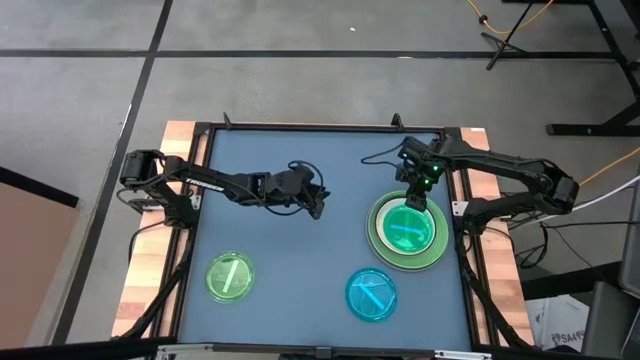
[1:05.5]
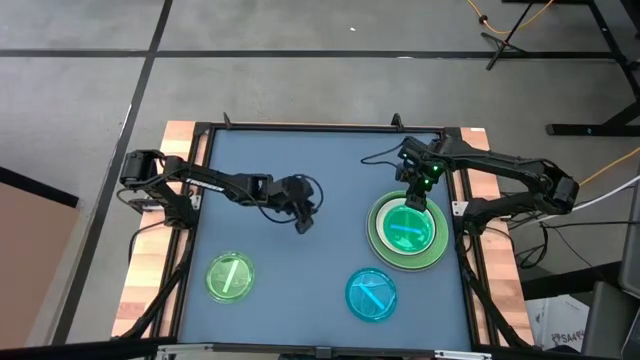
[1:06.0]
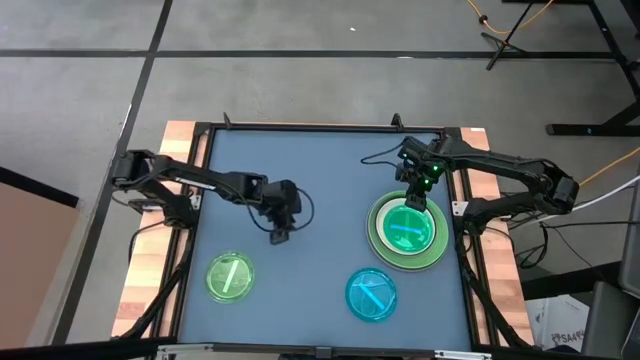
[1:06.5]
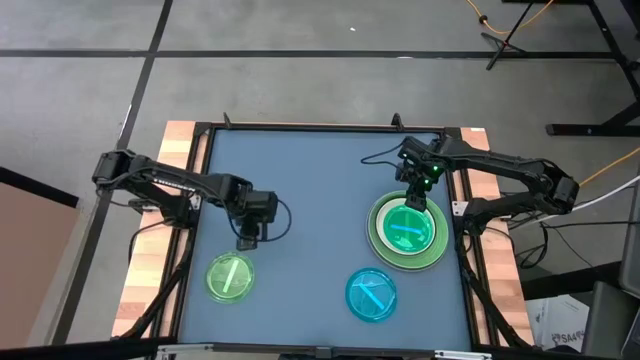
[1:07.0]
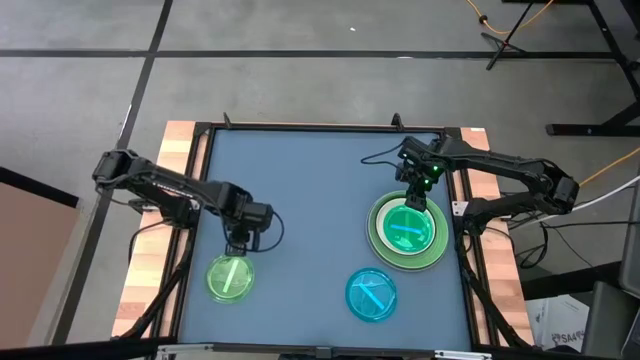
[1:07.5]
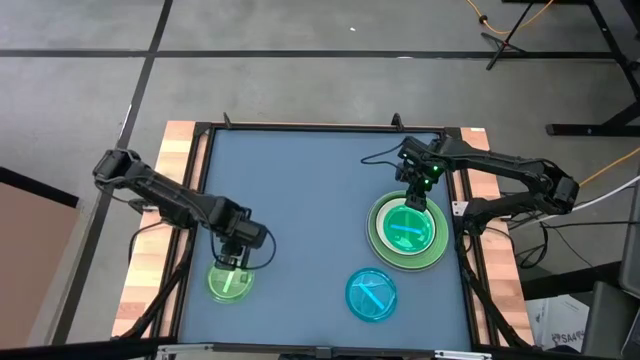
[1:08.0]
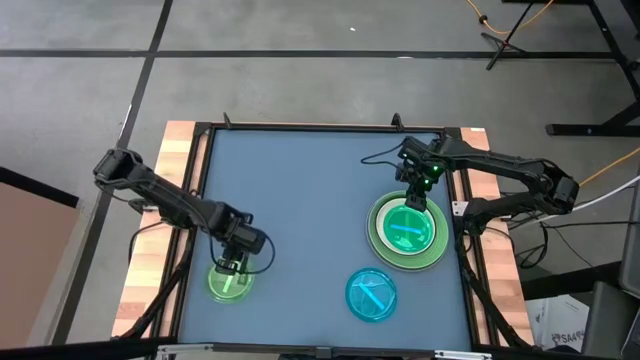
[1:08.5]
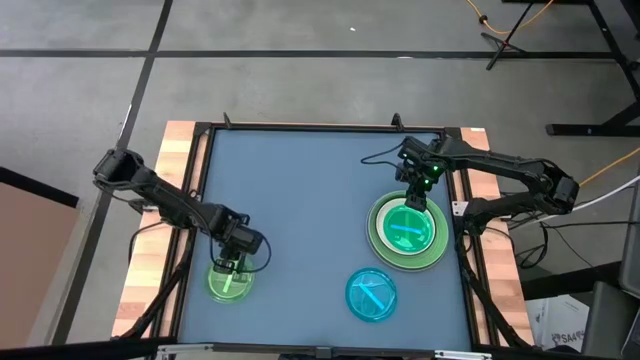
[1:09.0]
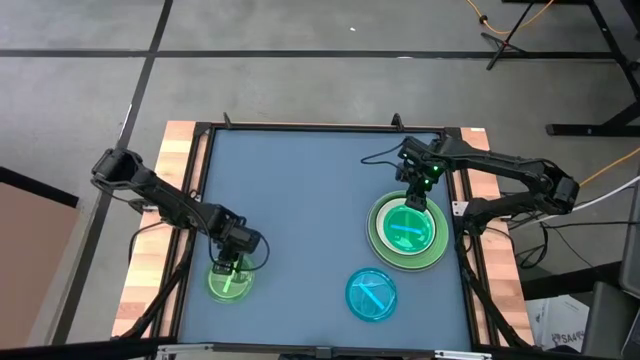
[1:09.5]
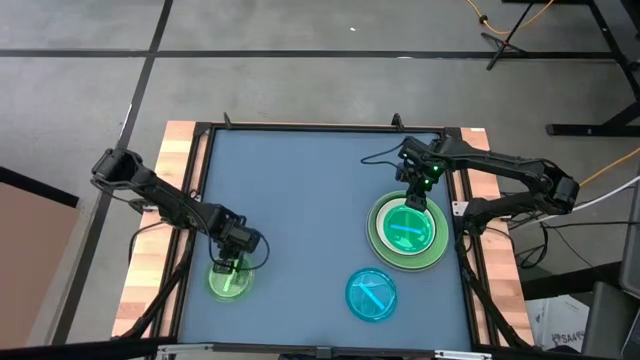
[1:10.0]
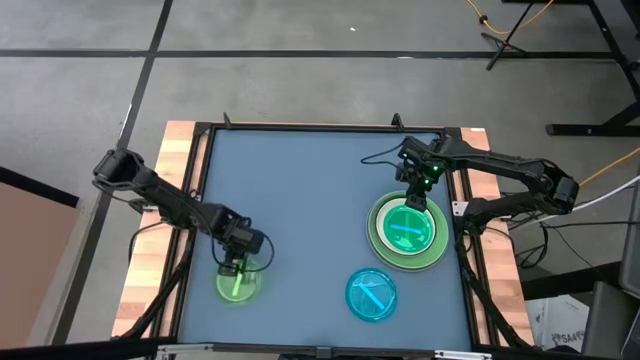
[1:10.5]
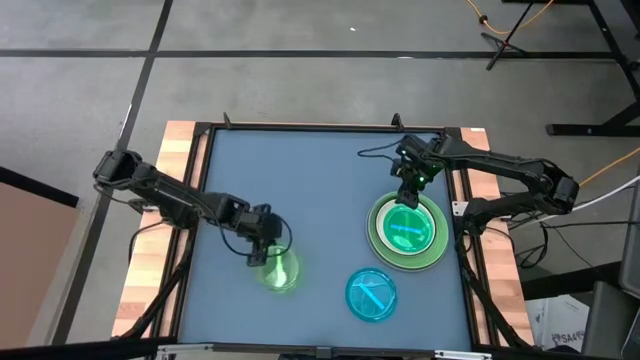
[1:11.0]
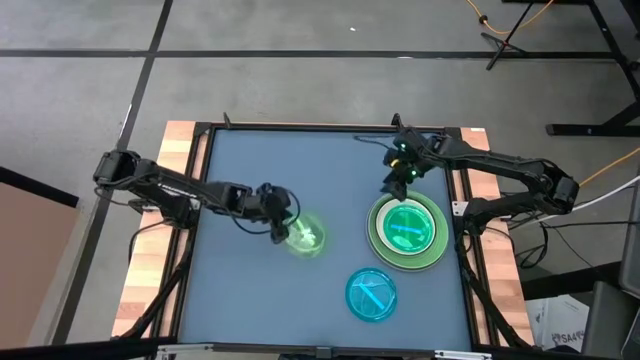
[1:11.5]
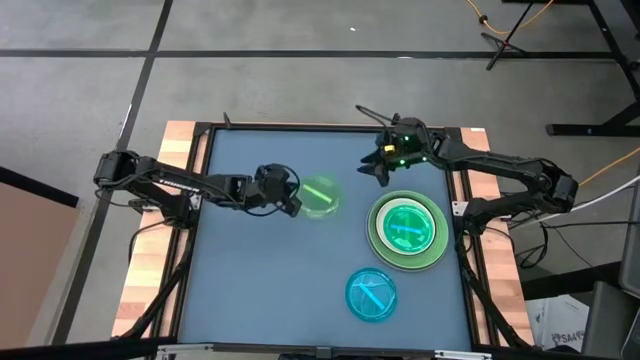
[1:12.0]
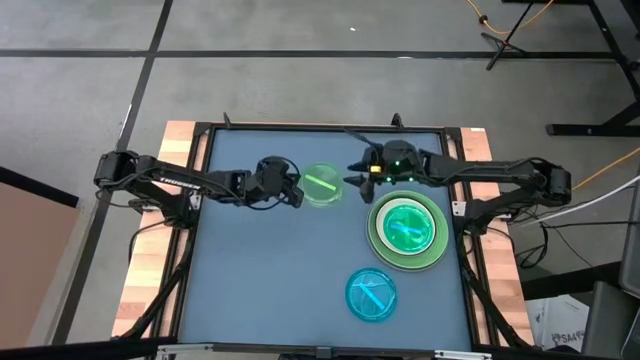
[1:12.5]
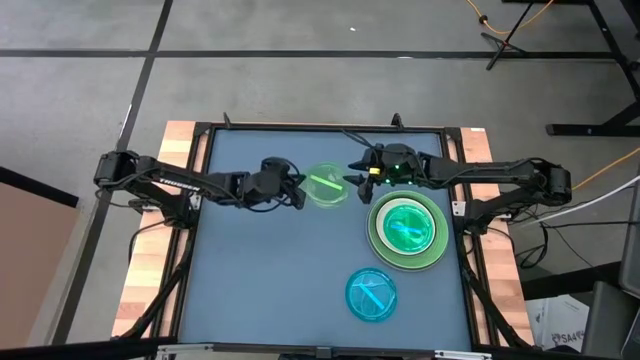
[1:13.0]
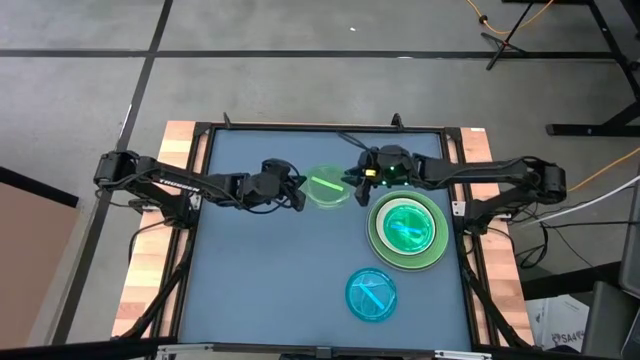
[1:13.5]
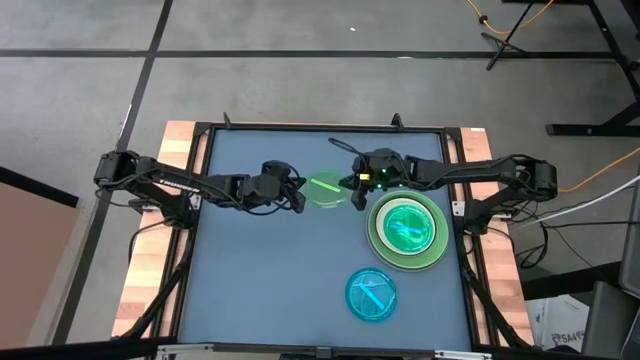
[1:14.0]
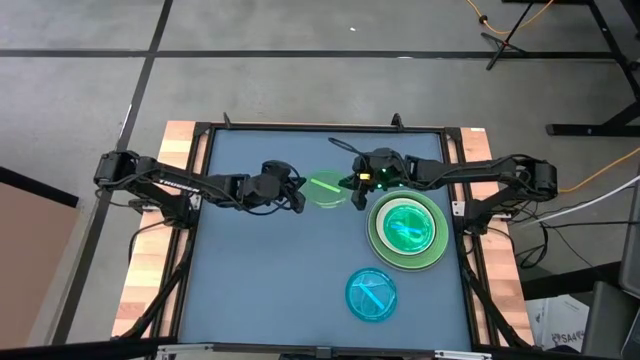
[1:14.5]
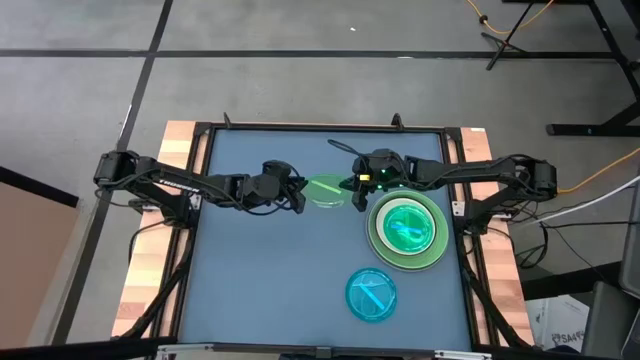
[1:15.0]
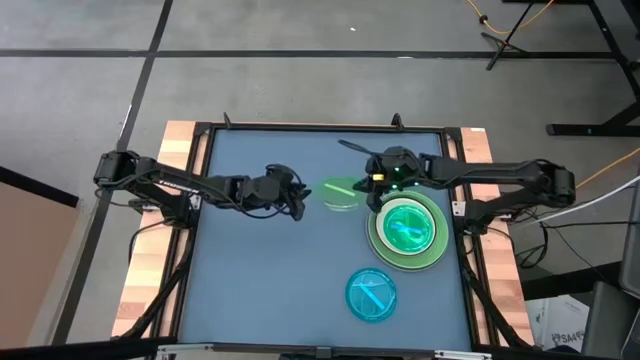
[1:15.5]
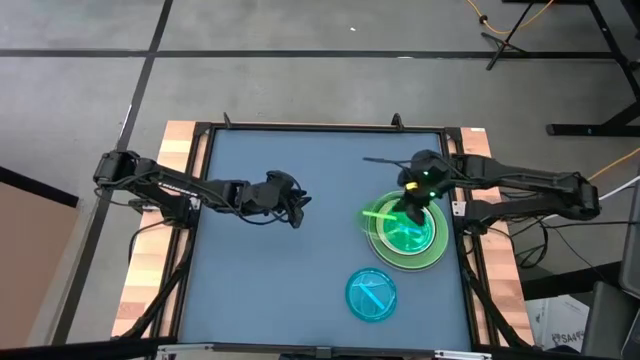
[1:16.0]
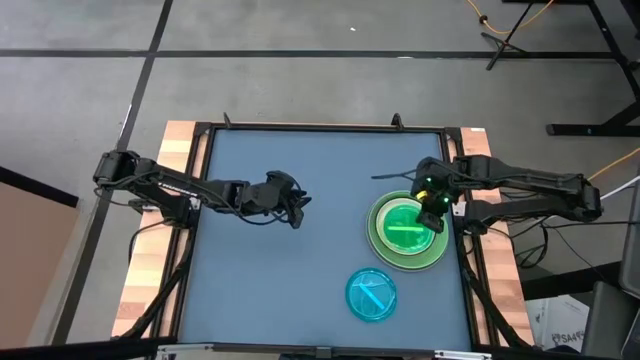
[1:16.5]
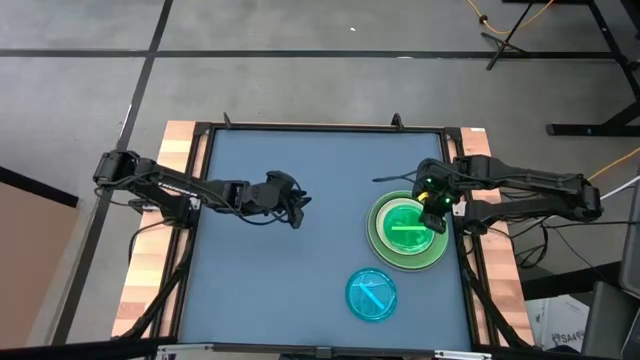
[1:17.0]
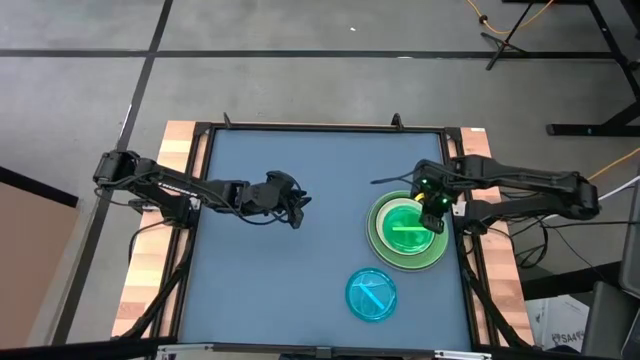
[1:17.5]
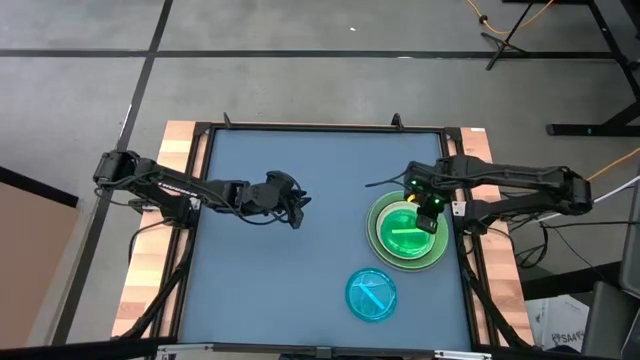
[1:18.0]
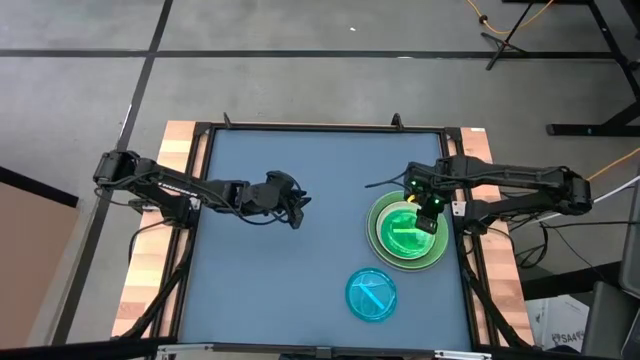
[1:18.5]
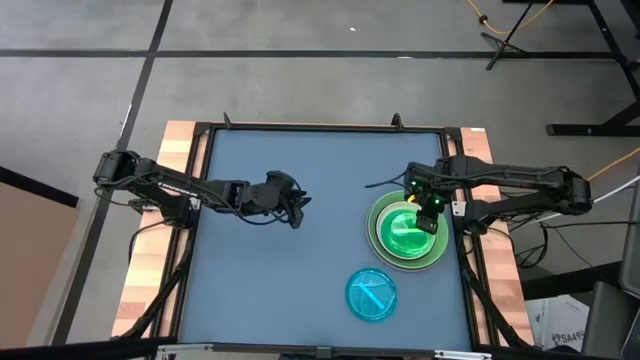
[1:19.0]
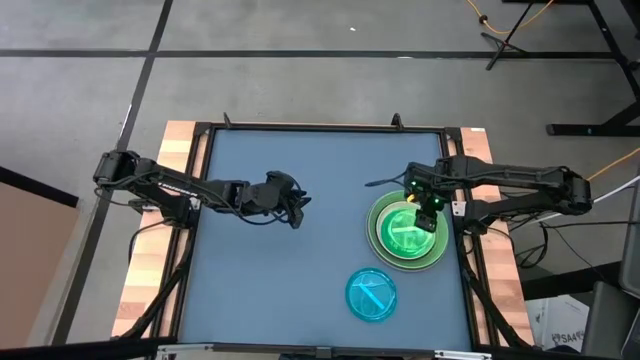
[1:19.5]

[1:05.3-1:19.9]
Task: Stack plastic plates
Stack the green plate on top of the blue plate

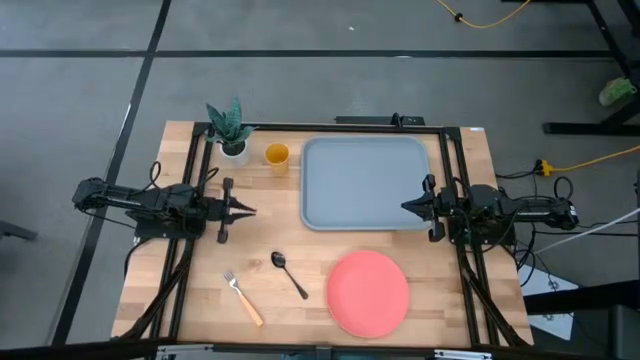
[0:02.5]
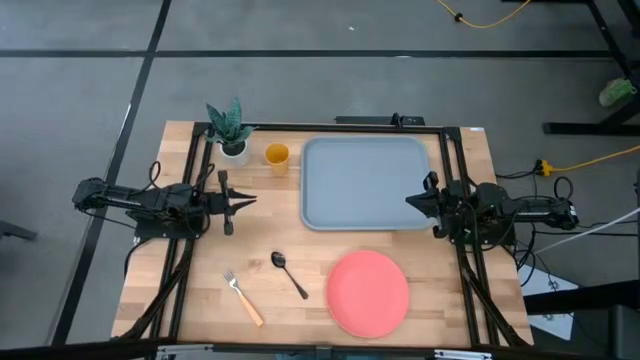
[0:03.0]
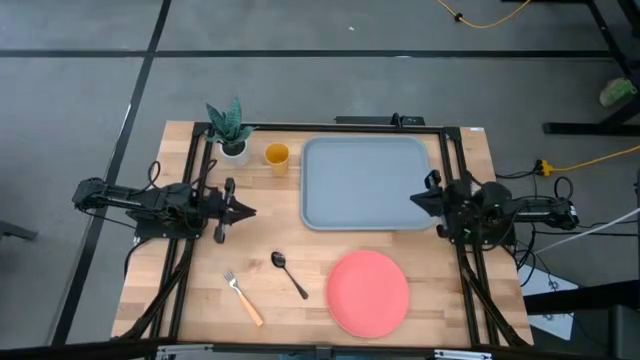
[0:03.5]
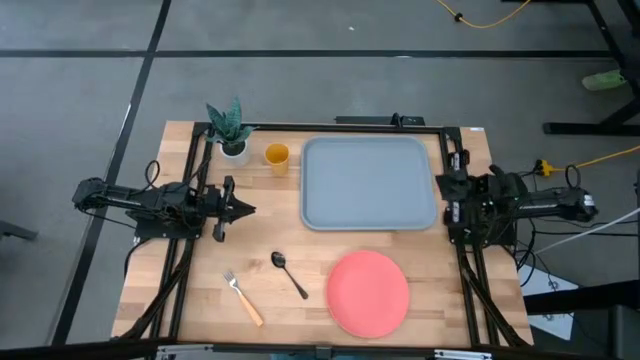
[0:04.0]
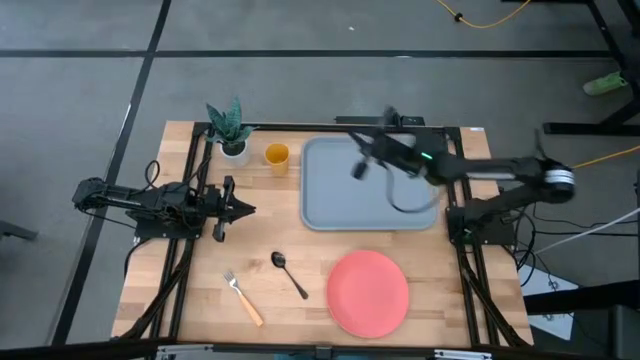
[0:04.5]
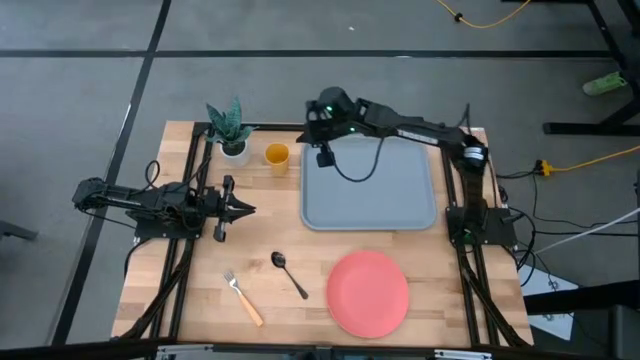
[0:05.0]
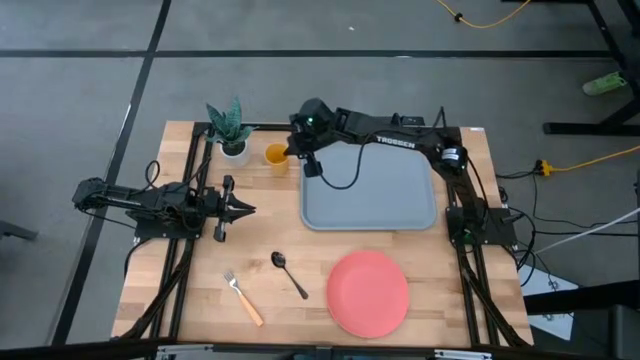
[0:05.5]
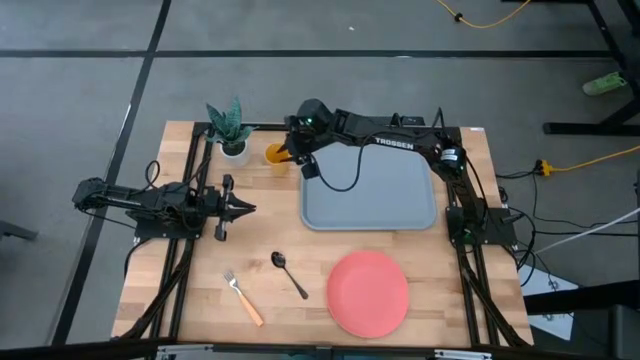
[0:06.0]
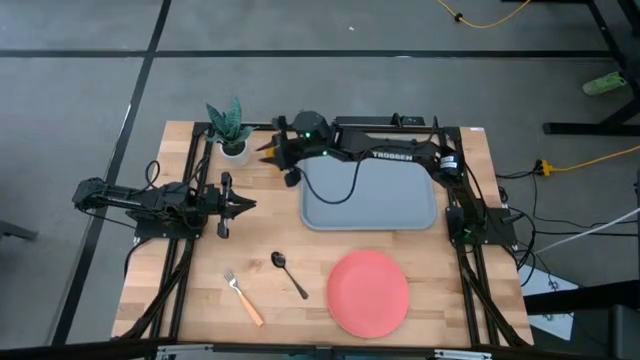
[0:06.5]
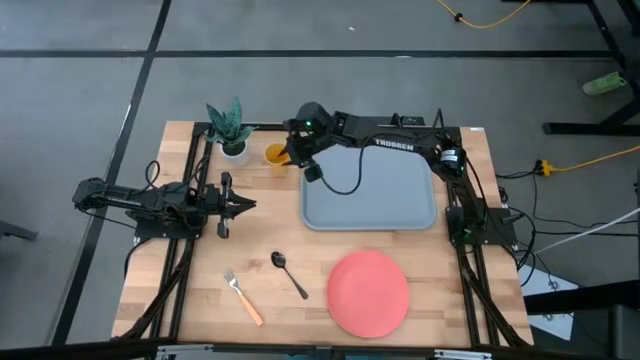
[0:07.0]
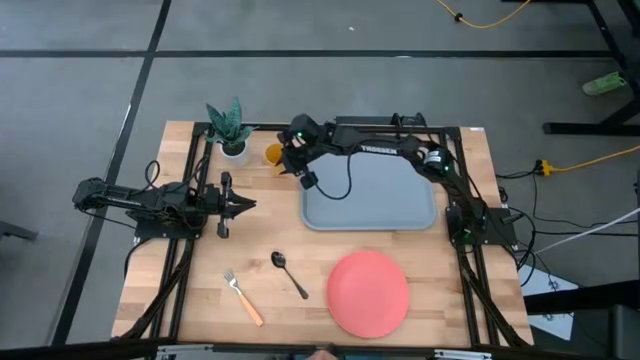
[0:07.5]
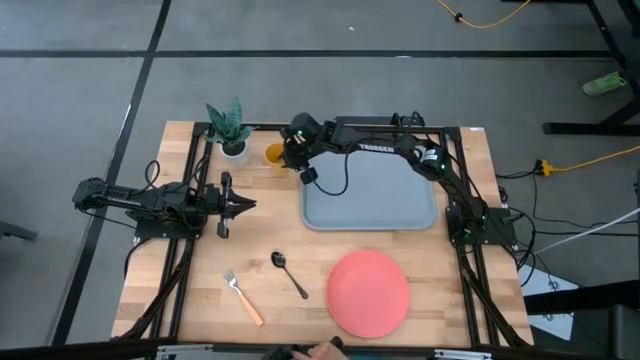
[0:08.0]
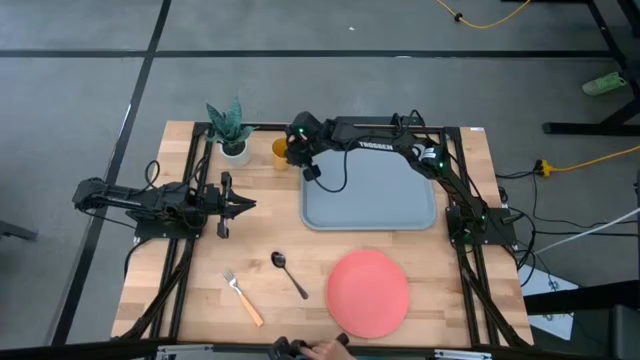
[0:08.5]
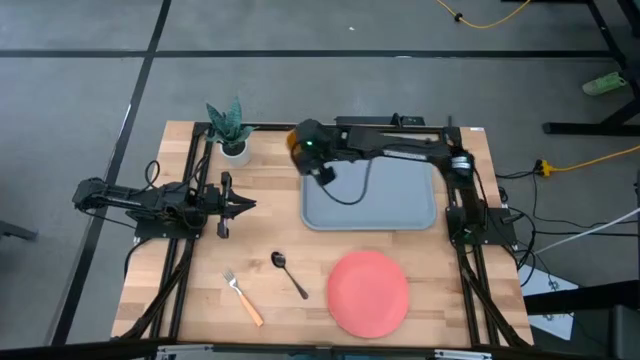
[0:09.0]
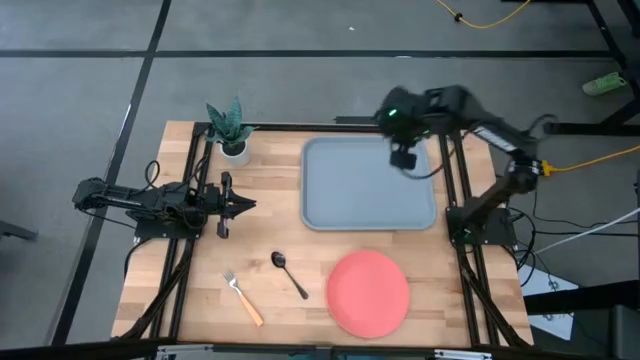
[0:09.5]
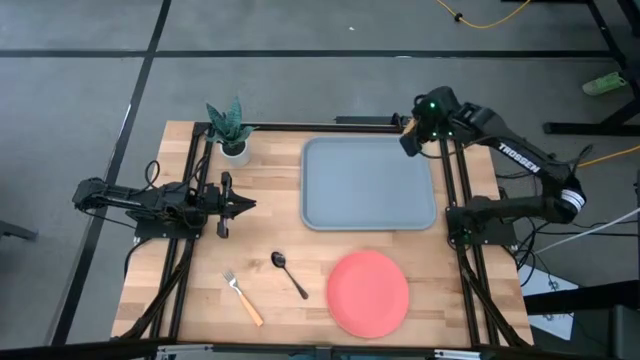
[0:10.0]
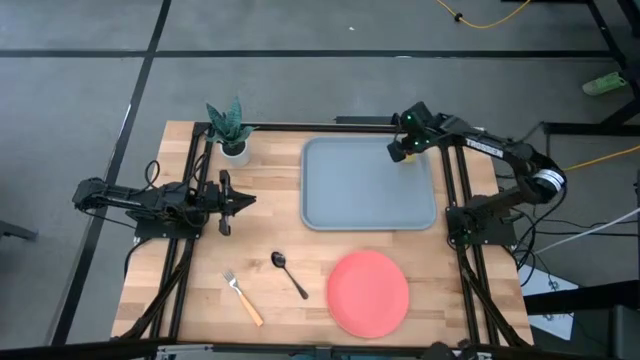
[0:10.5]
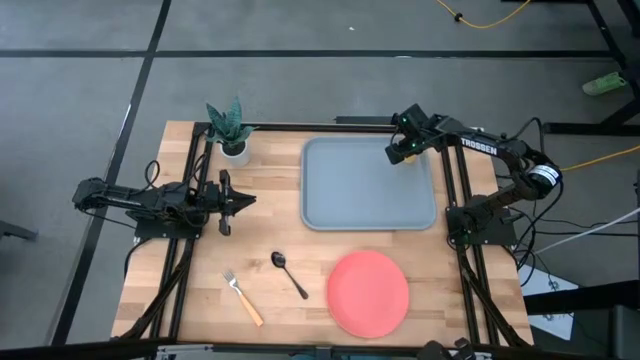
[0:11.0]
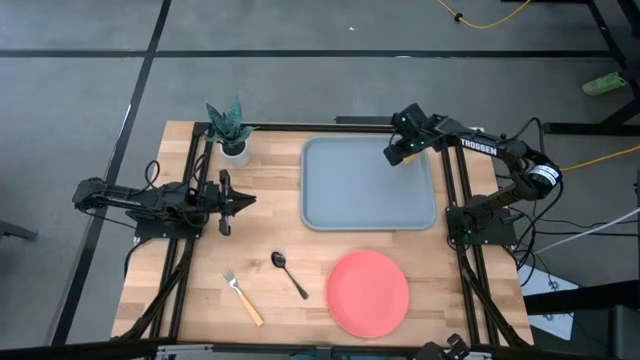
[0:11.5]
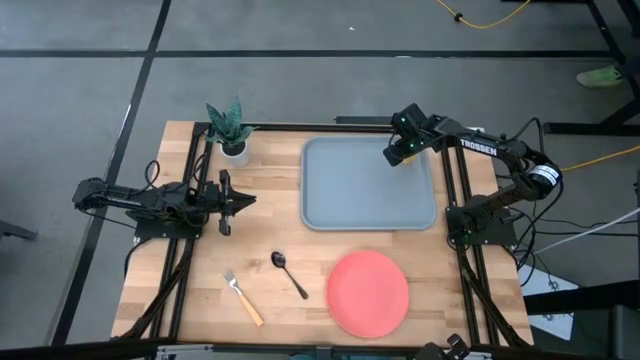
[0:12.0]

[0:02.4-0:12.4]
Task: Pick and place plate/cup/fork/spoon on tray
Put the yellow cup on the gray serving tray
